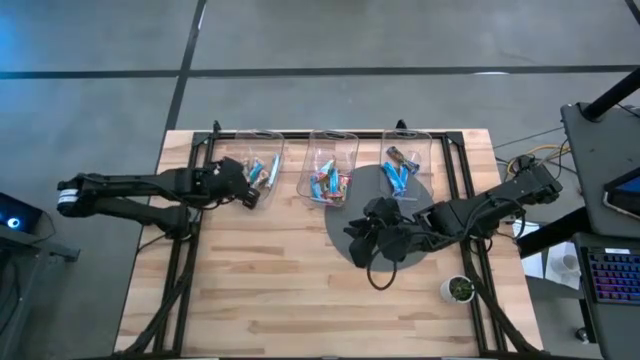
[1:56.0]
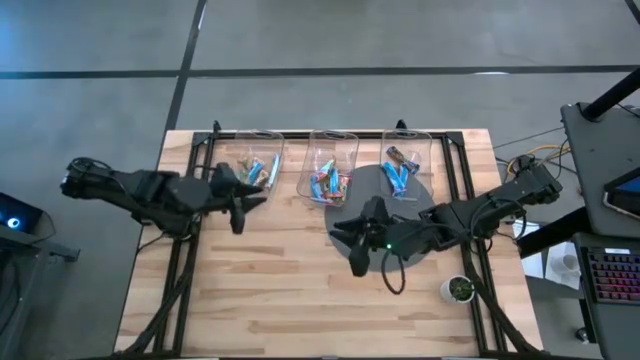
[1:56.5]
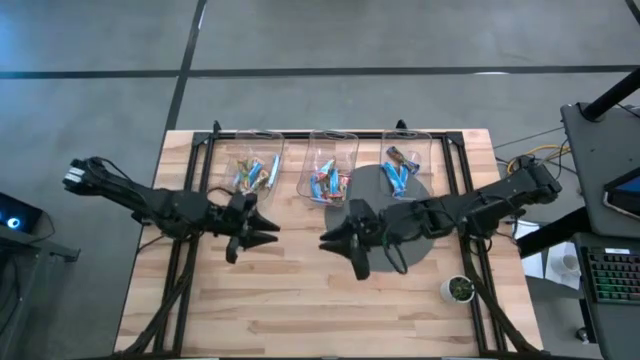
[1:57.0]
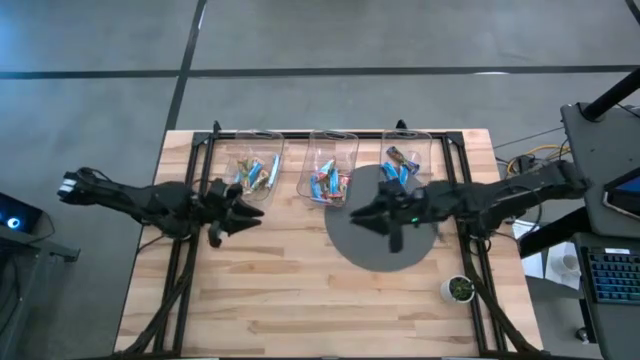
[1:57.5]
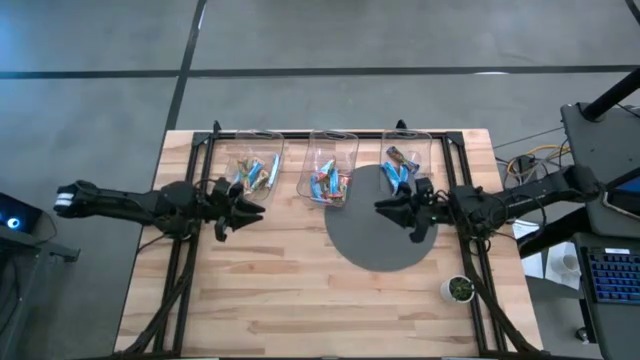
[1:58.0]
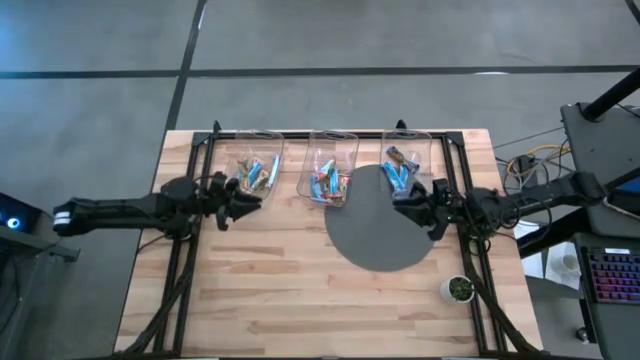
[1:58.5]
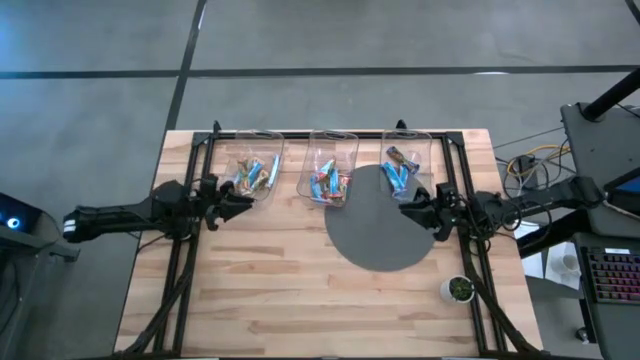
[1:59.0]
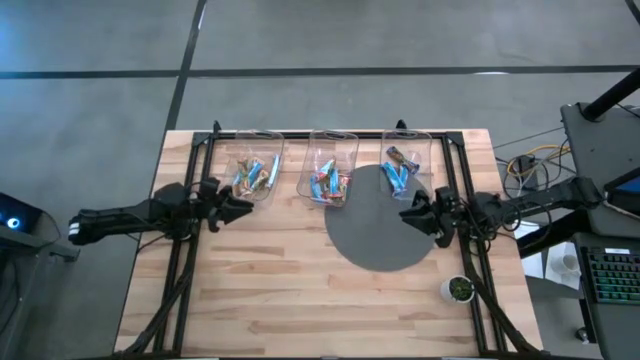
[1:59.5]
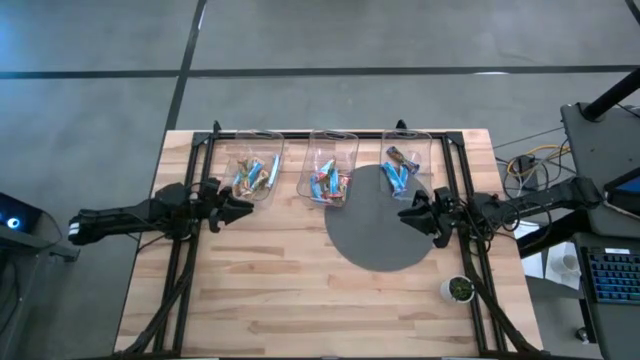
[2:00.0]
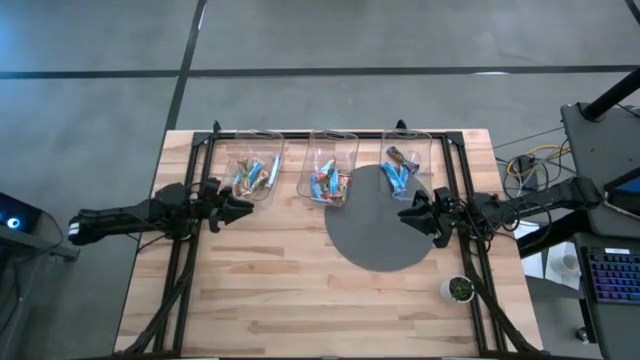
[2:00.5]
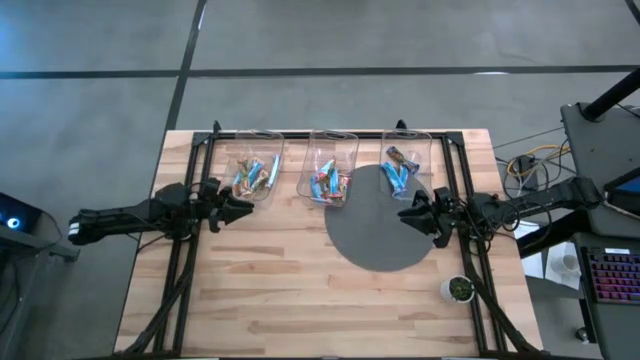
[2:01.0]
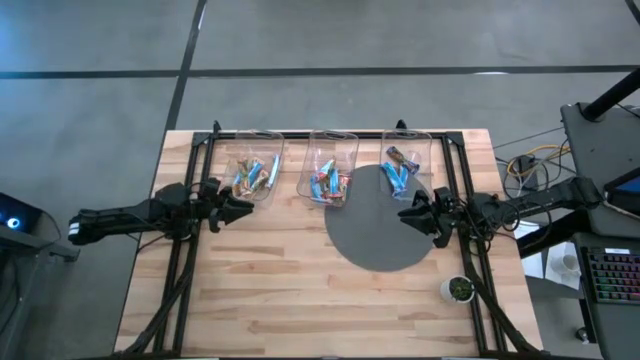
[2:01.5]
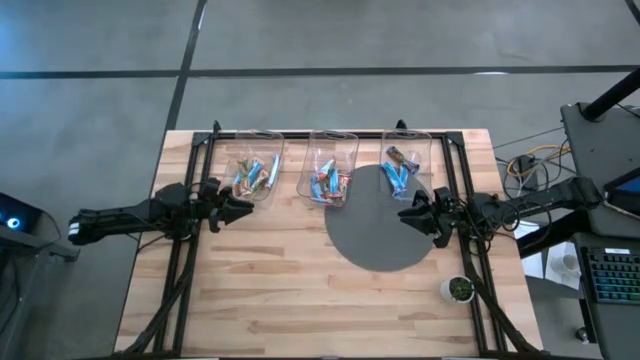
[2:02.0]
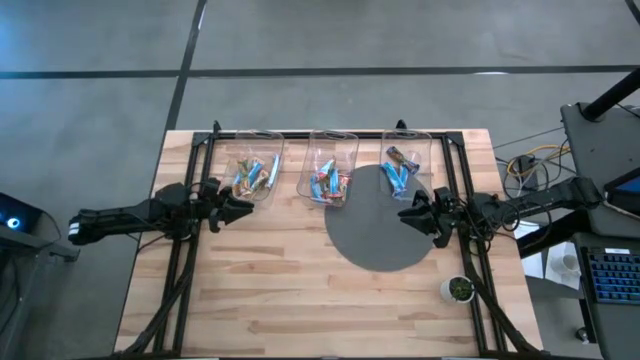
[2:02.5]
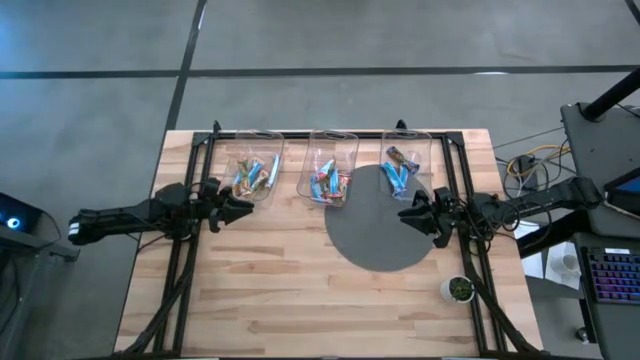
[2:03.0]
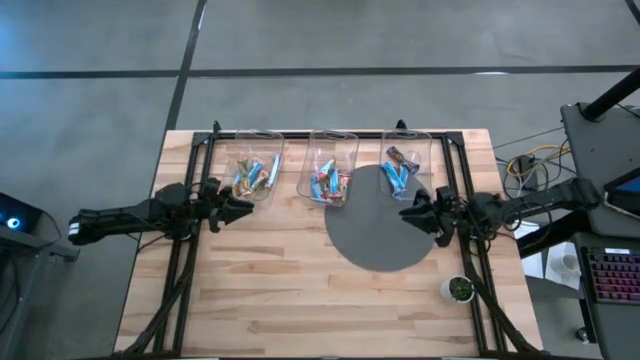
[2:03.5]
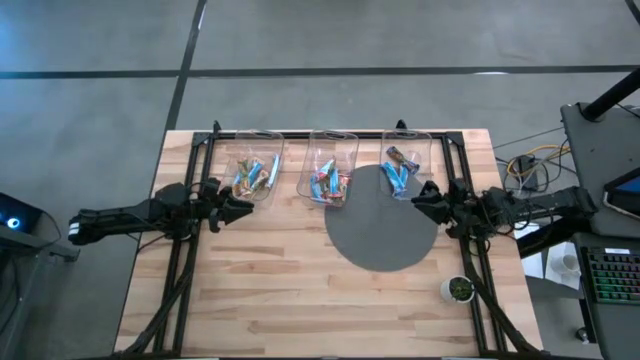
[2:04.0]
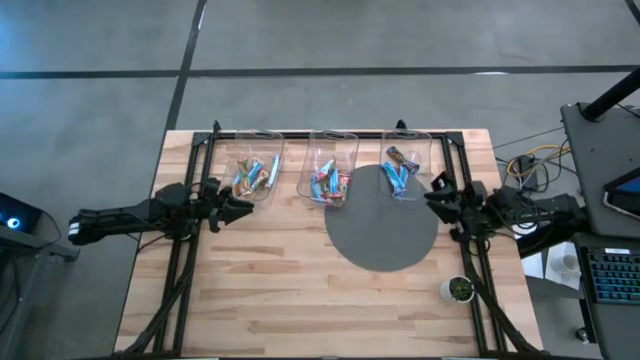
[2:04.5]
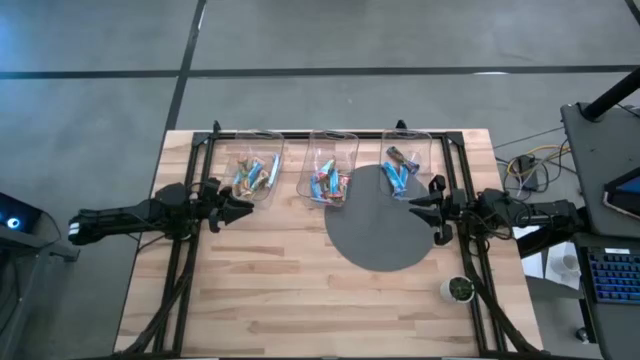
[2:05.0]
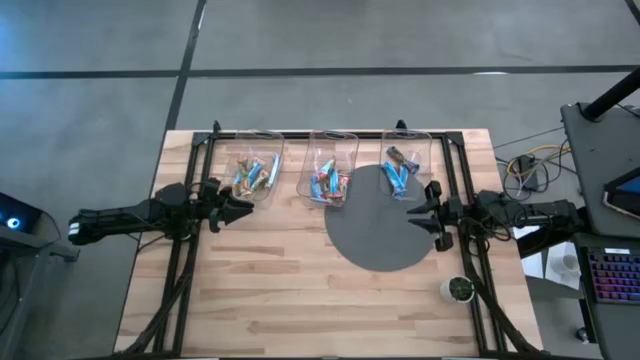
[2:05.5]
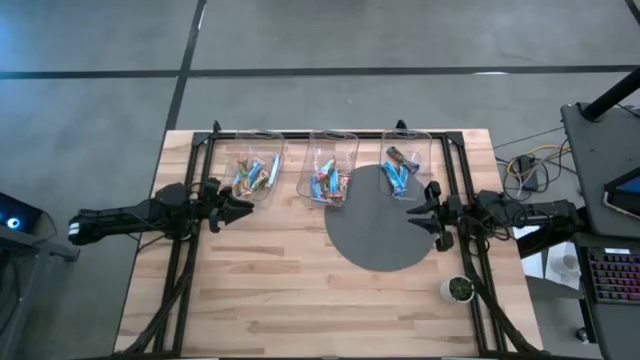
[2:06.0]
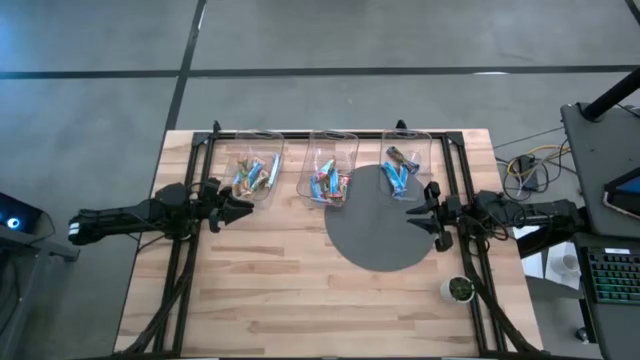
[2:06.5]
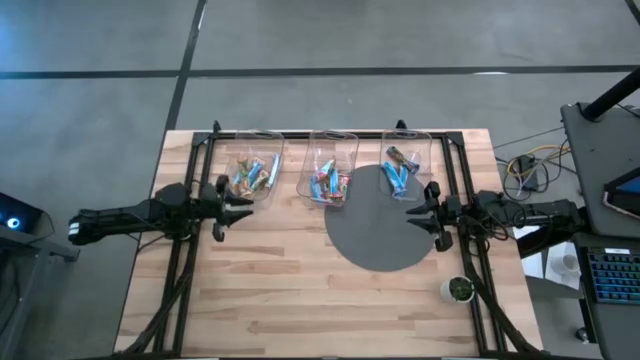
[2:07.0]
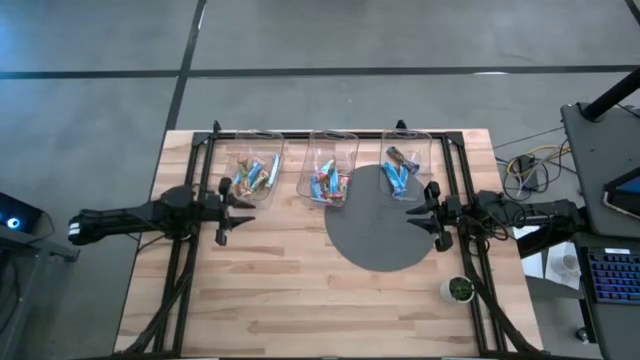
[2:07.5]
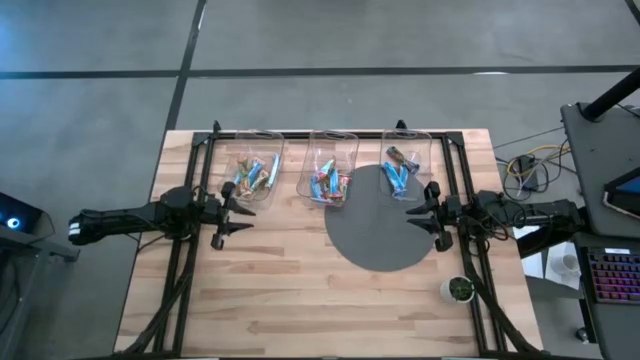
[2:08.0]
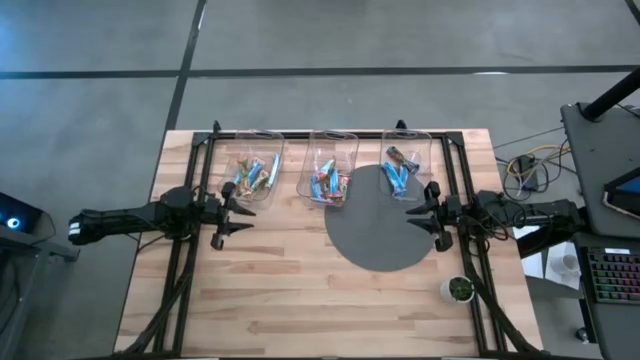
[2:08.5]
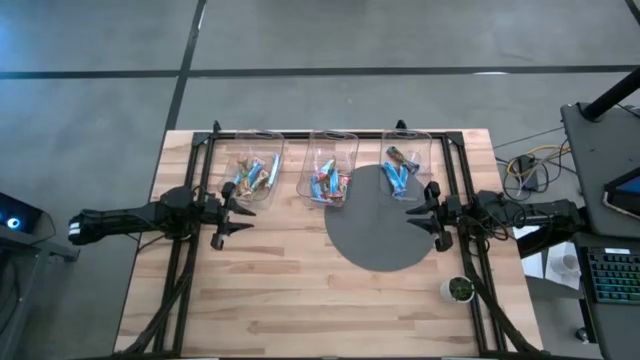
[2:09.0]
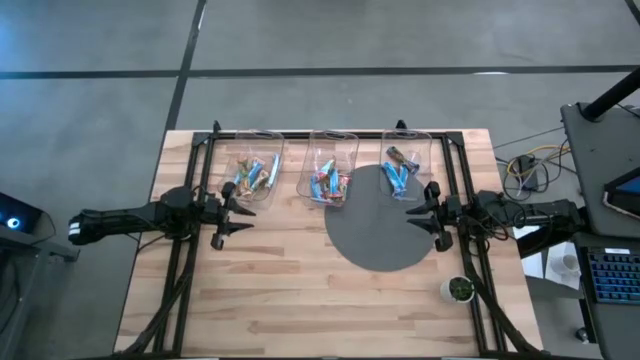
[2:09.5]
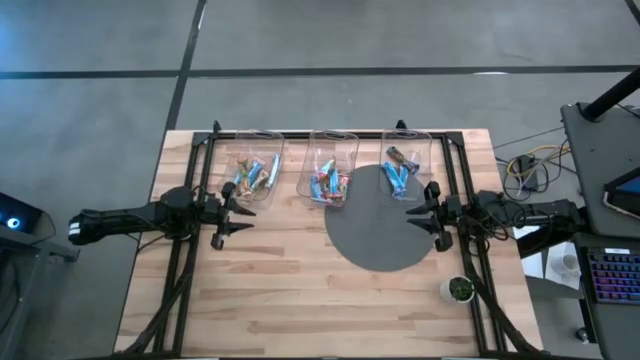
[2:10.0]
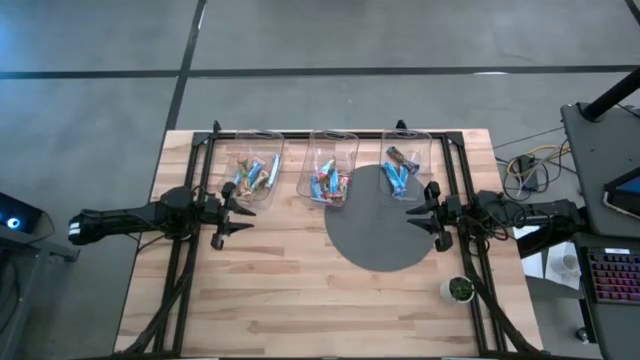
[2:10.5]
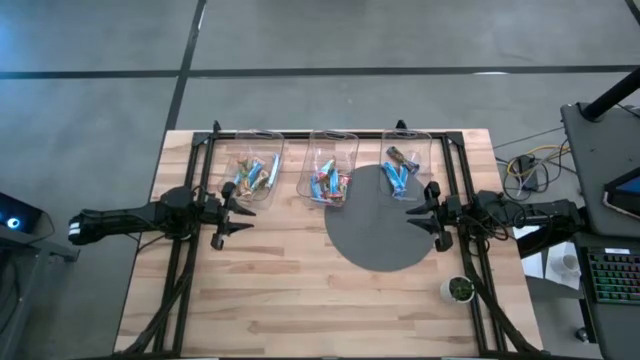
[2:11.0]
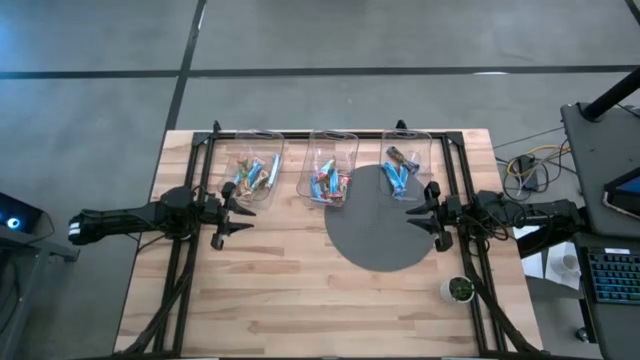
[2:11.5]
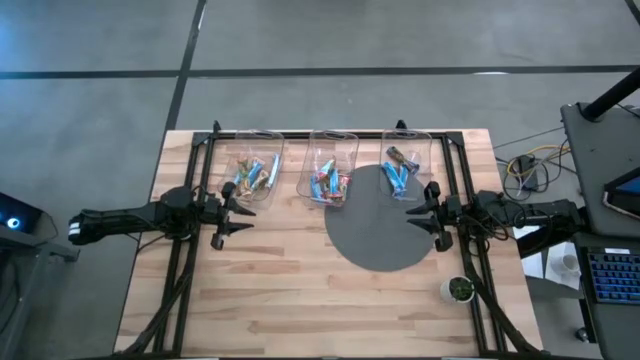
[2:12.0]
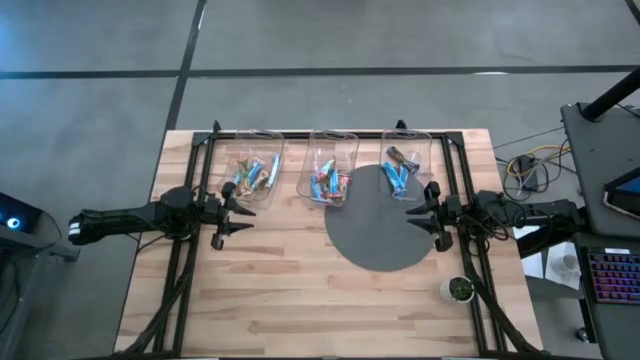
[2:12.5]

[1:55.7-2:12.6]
Task: Pick and place Granola Bars by type
Return to Home Position

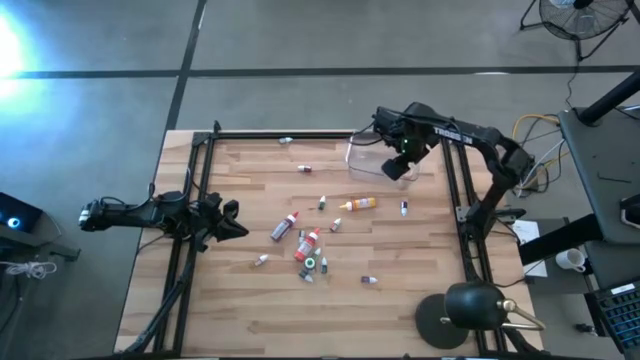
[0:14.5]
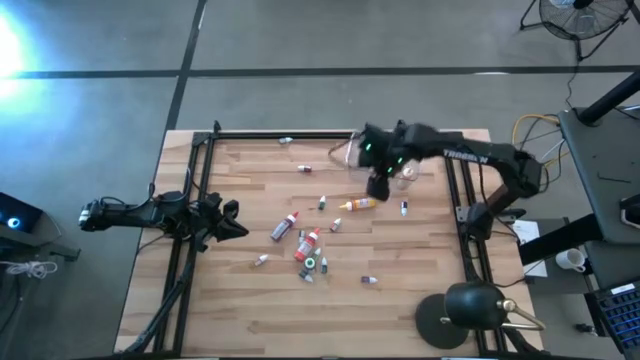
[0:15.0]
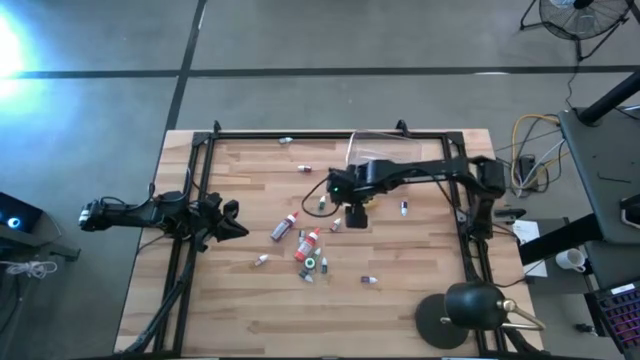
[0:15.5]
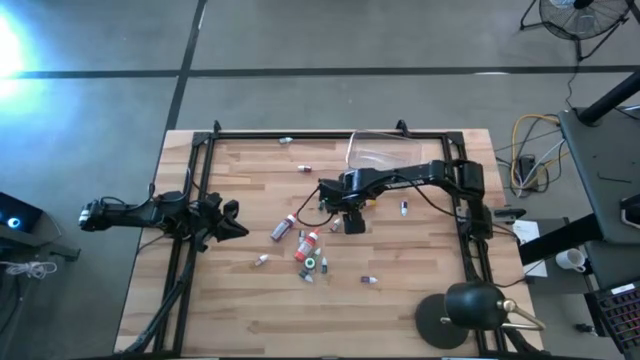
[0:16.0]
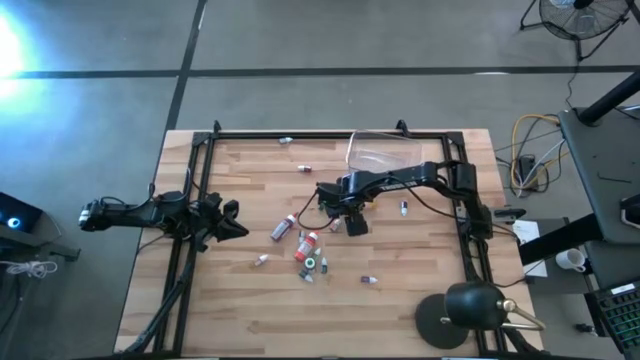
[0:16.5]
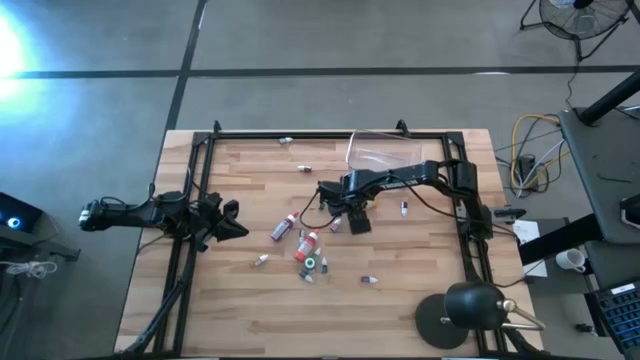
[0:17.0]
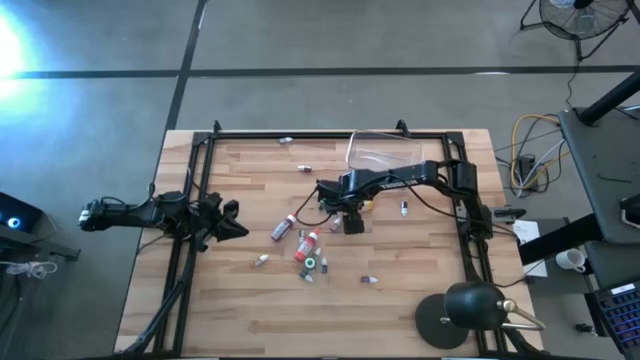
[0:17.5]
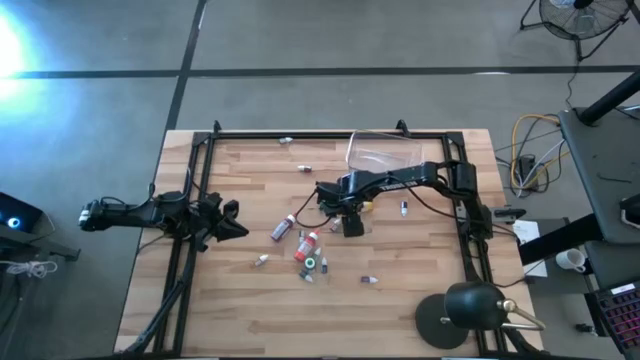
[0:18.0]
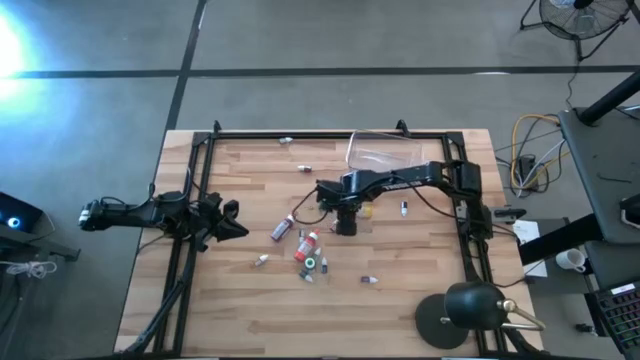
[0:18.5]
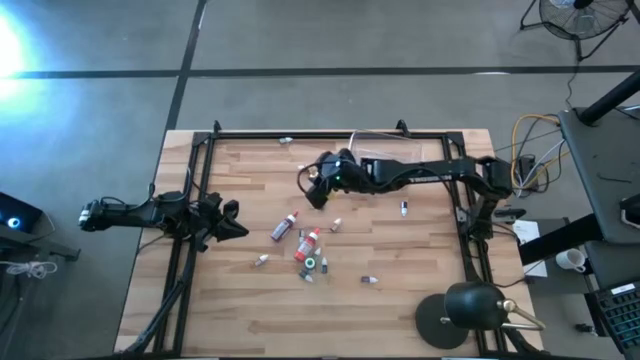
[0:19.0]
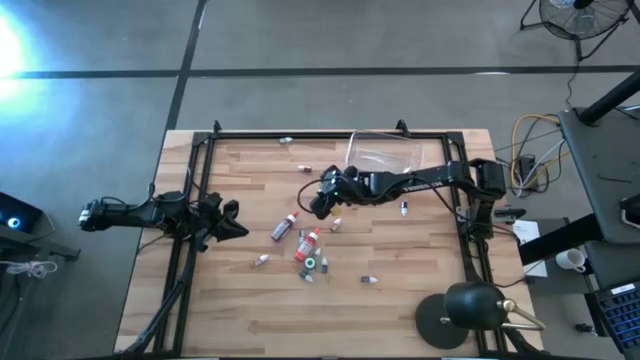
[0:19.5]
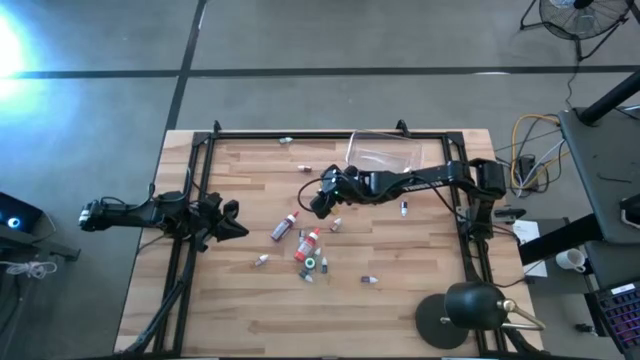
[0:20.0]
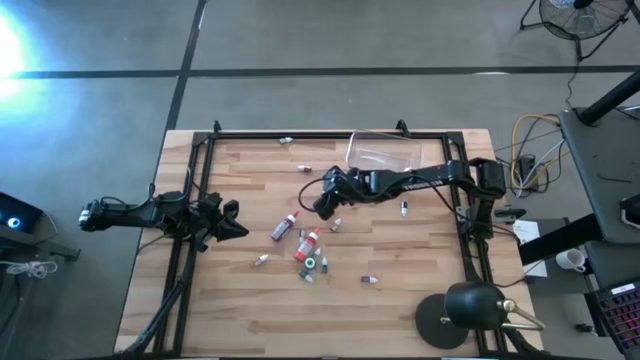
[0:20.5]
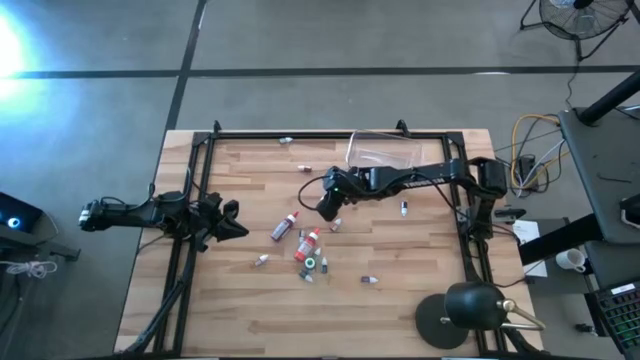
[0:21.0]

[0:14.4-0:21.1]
Task: Pick & Place food coloring
Put the large yellow food coloring bottle into the transparent bin
